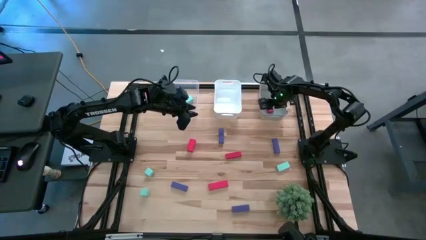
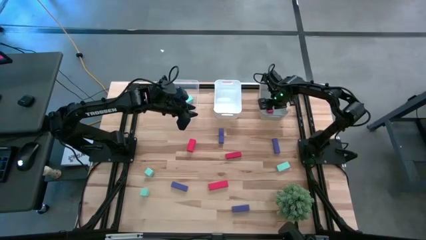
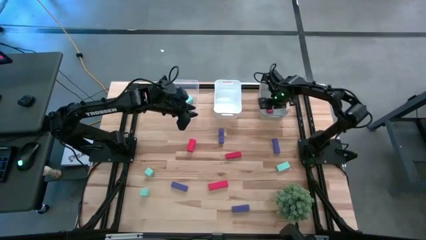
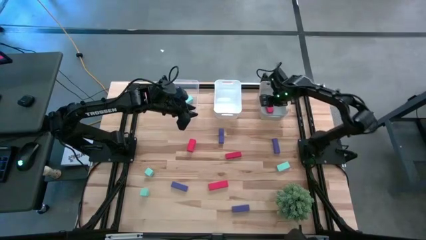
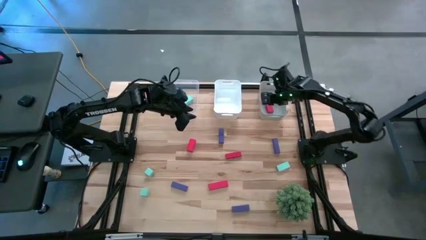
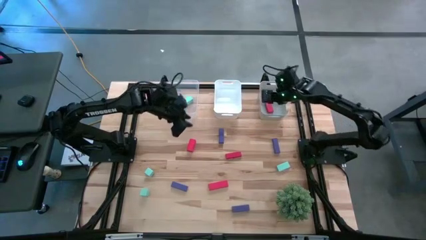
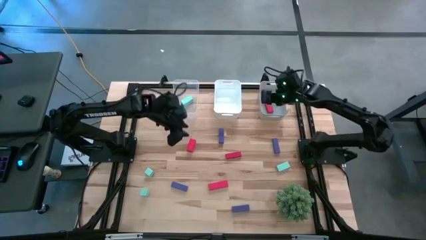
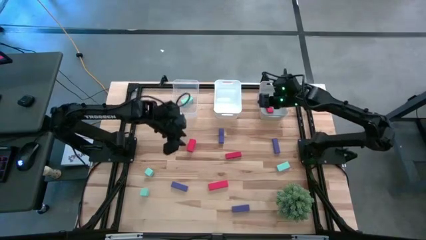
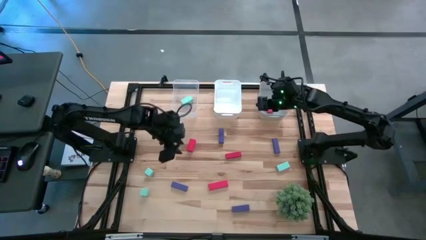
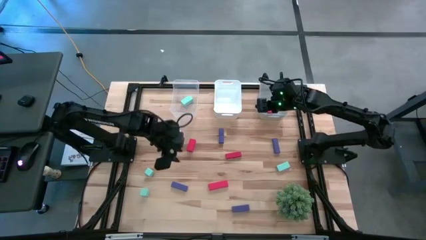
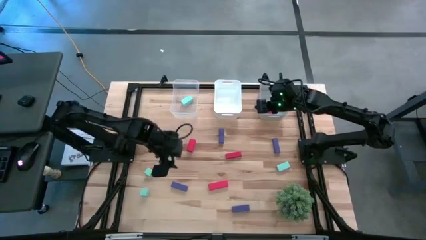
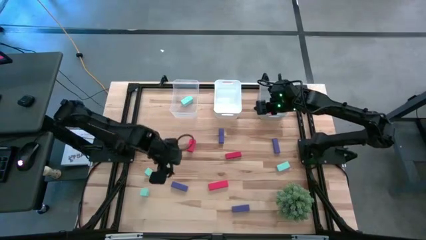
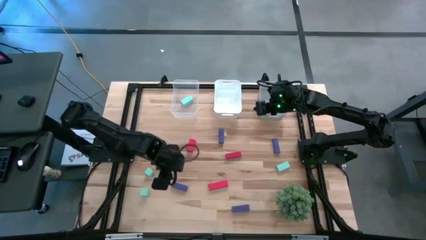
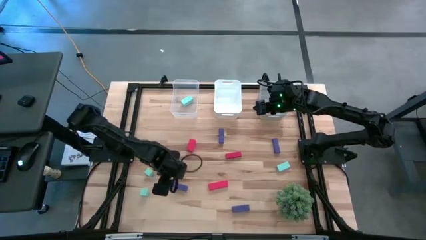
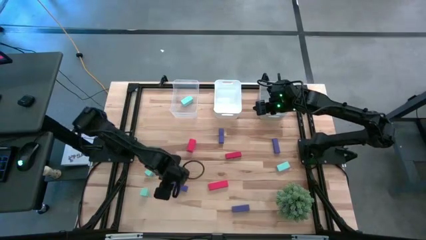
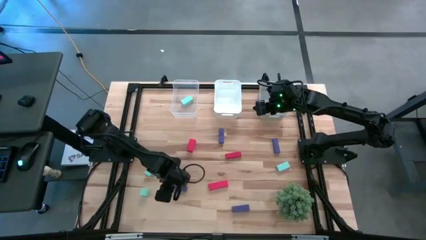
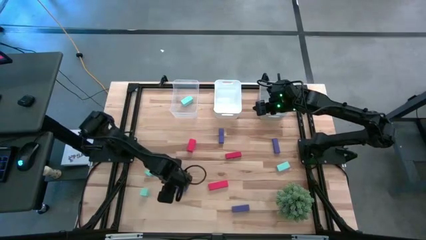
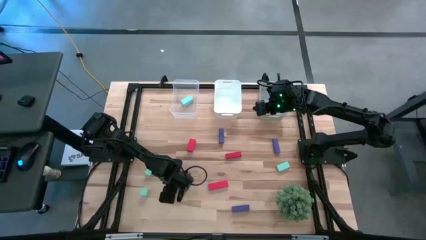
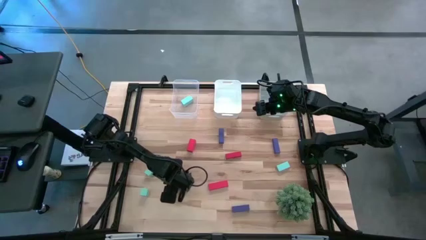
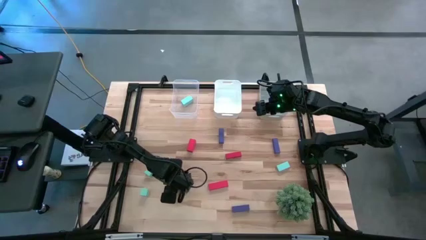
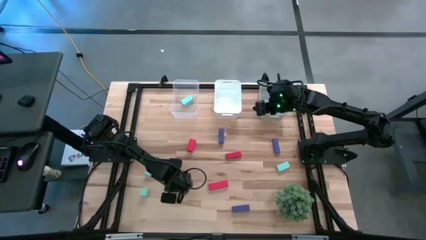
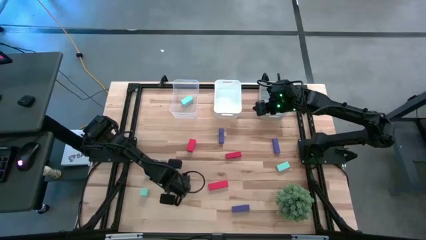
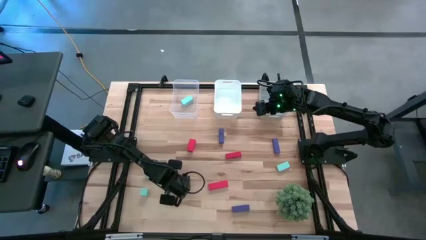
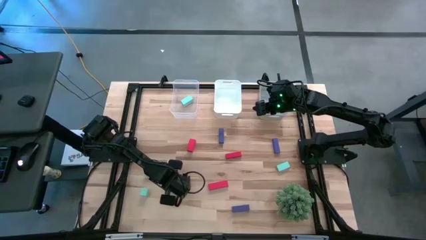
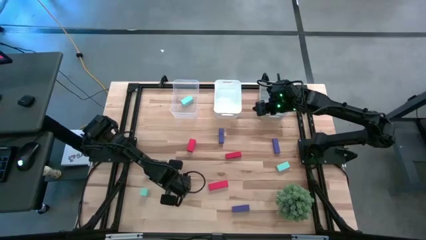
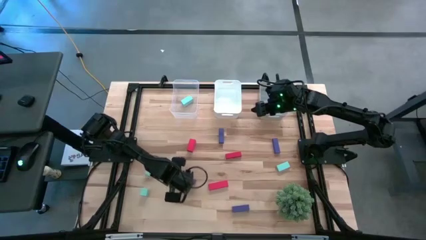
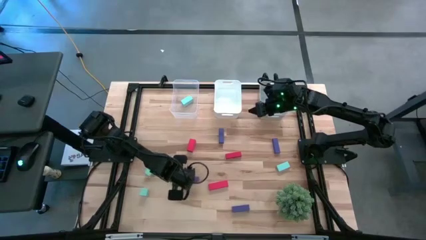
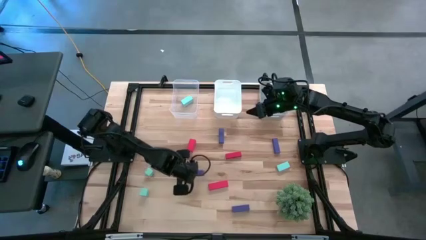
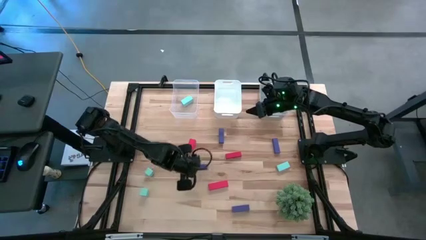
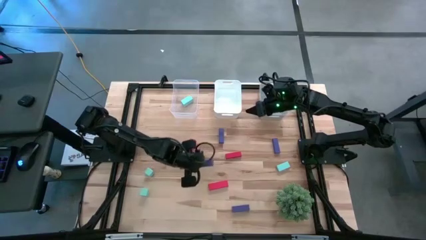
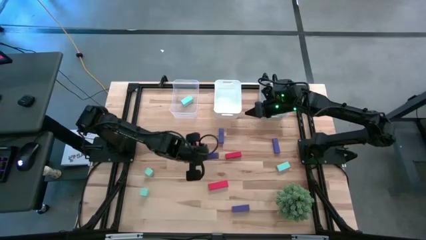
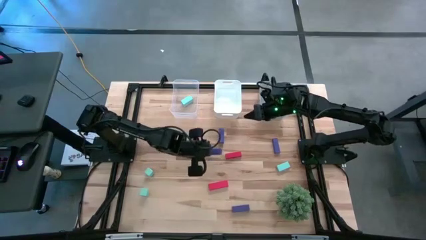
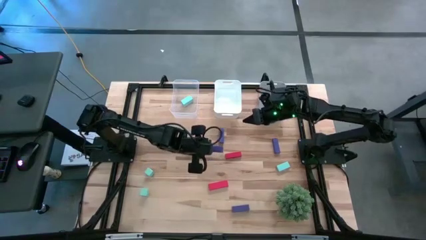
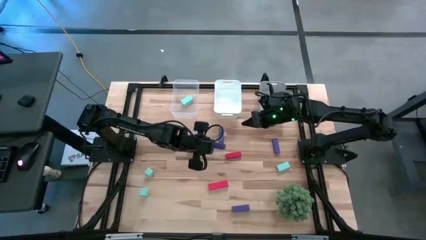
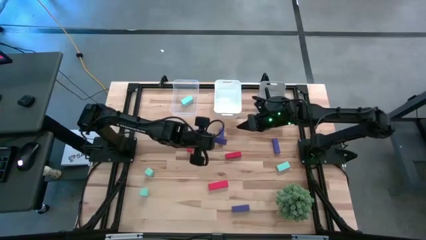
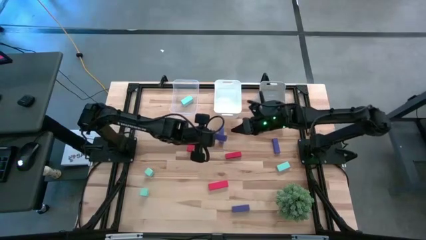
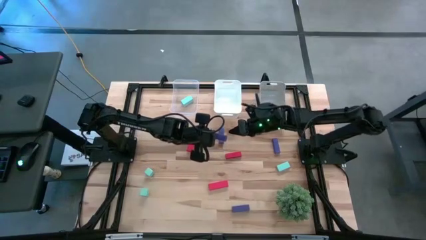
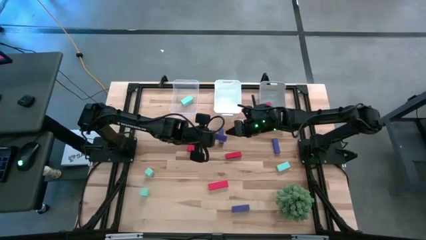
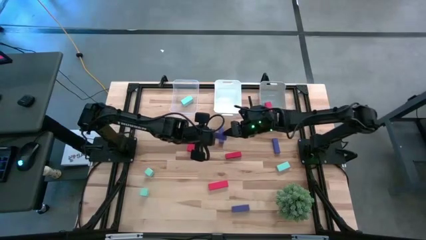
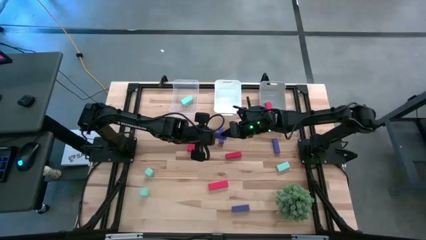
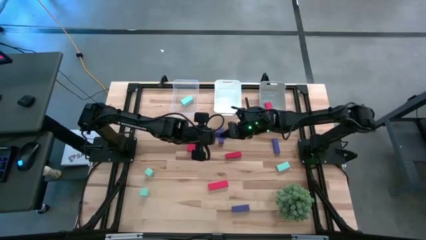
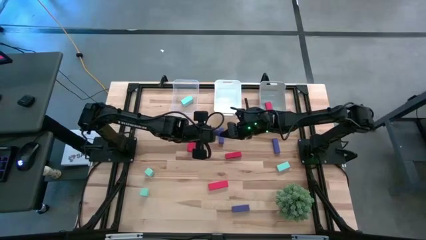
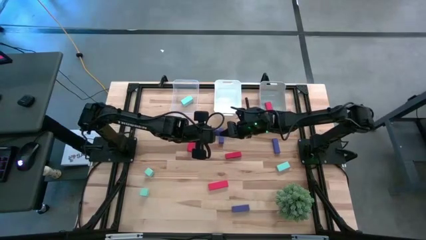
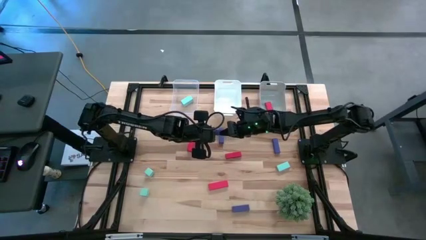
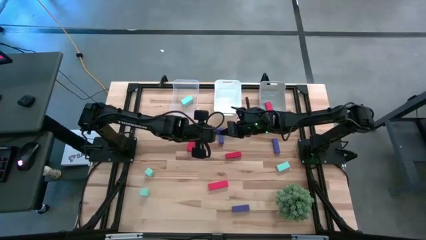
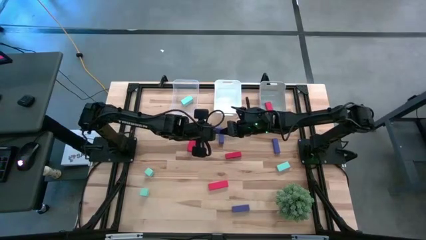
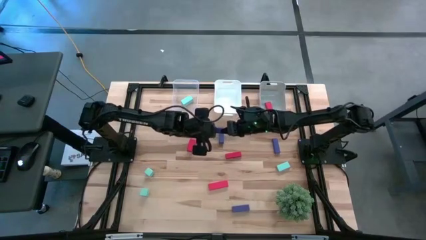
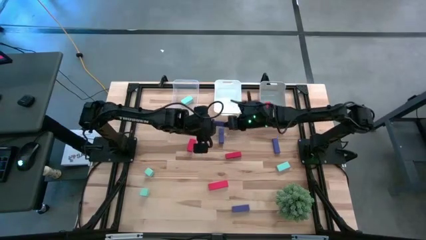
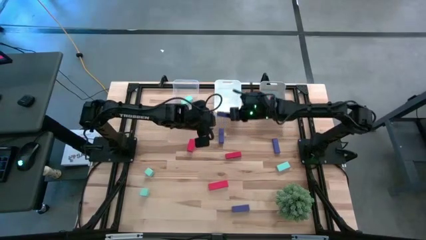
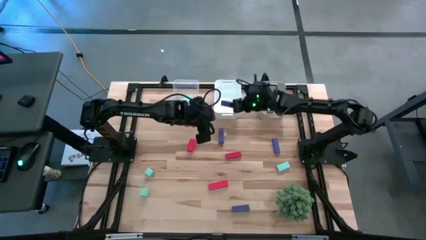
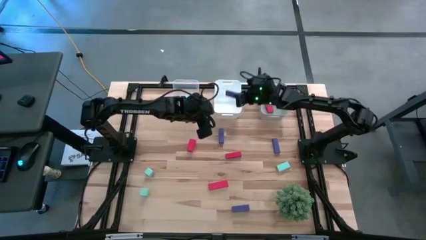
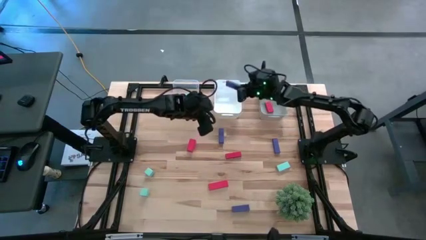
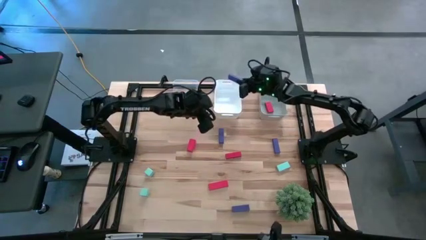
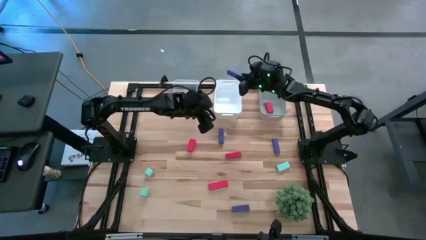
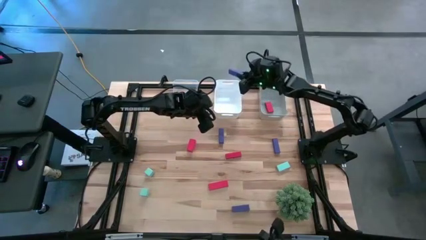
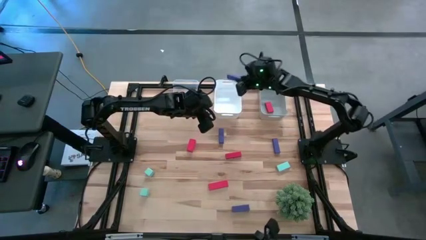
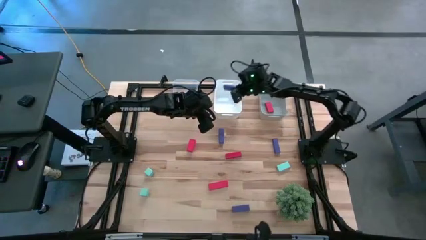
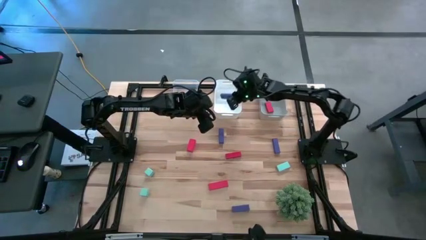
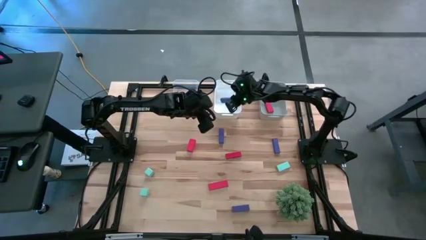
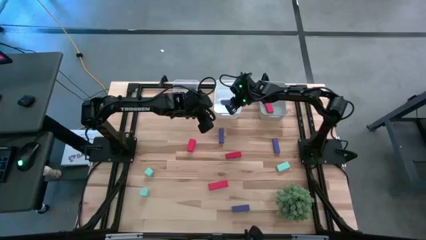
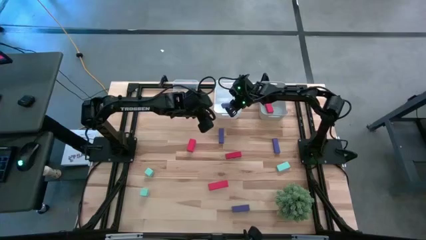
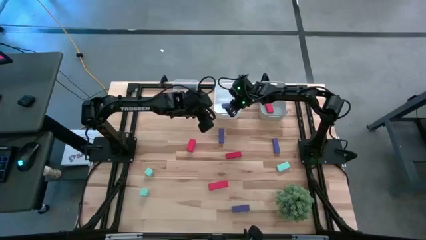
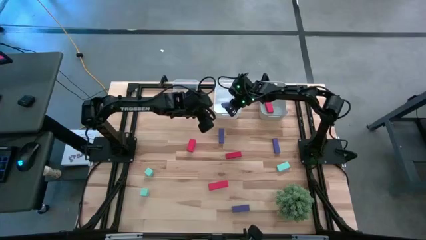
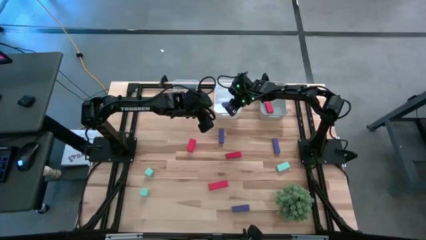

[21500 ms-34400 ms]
Task: Sort & place blocks by color
Put the violet block into the white bin
